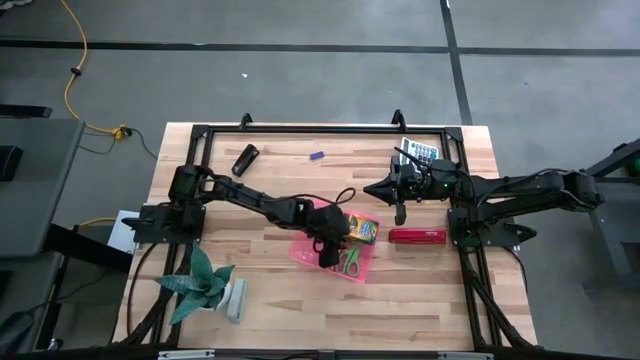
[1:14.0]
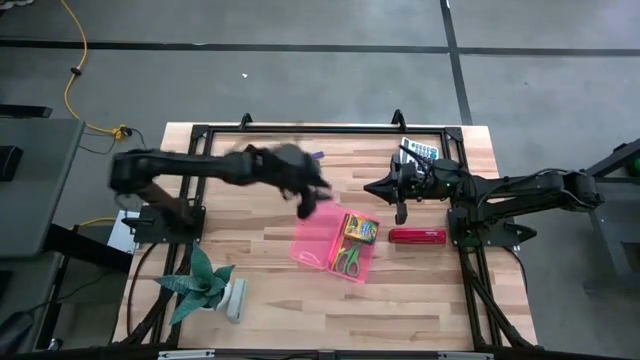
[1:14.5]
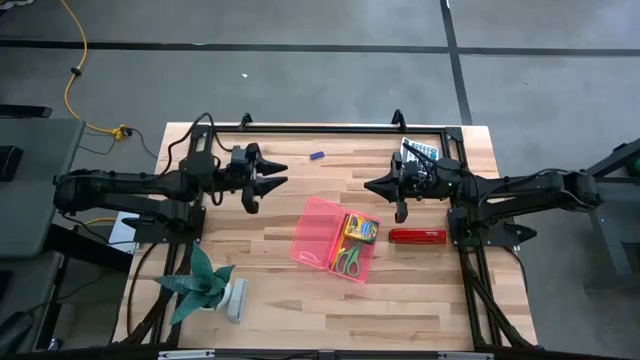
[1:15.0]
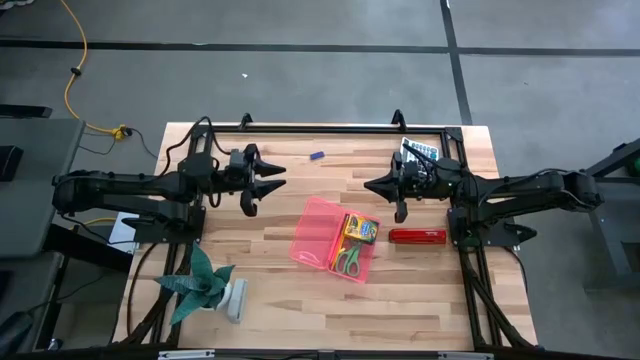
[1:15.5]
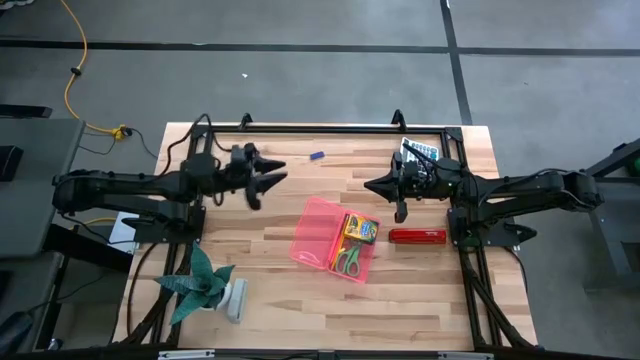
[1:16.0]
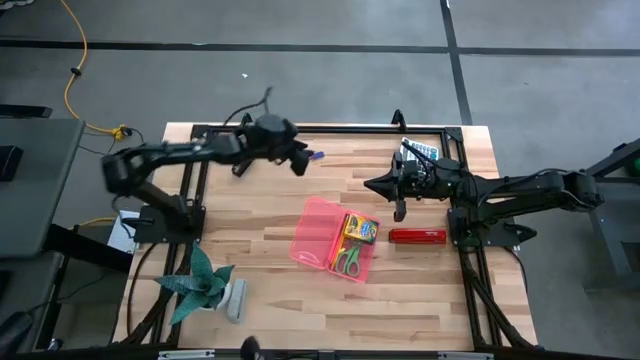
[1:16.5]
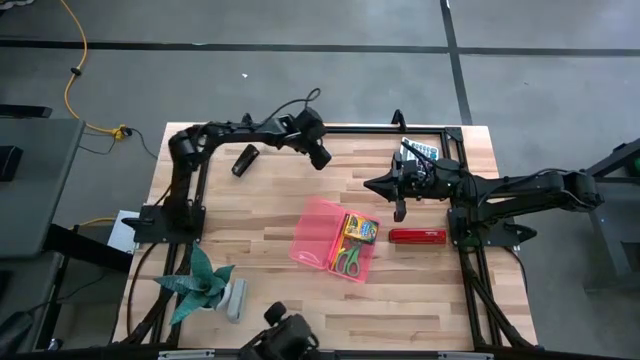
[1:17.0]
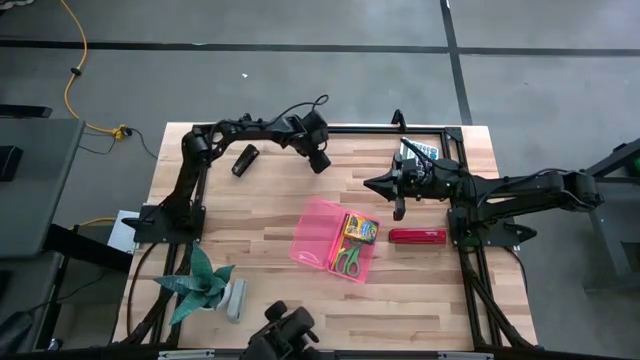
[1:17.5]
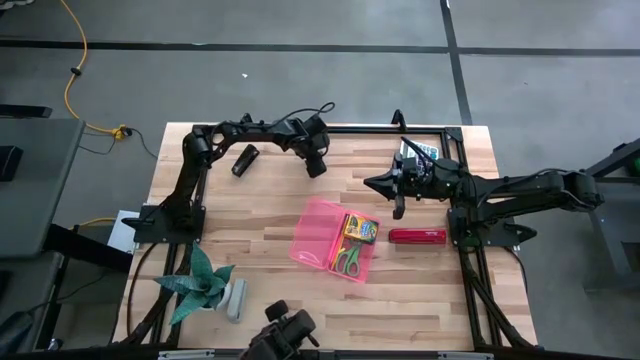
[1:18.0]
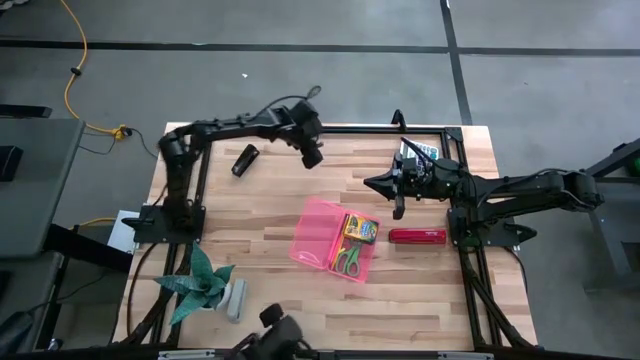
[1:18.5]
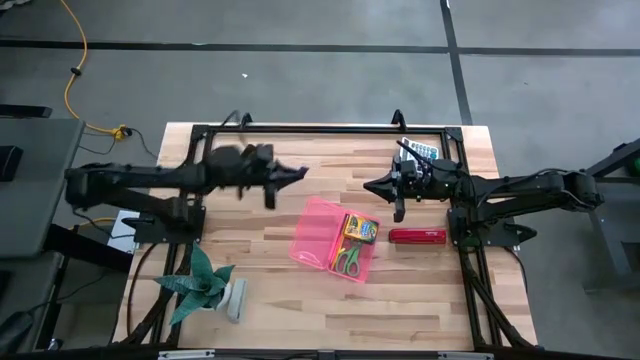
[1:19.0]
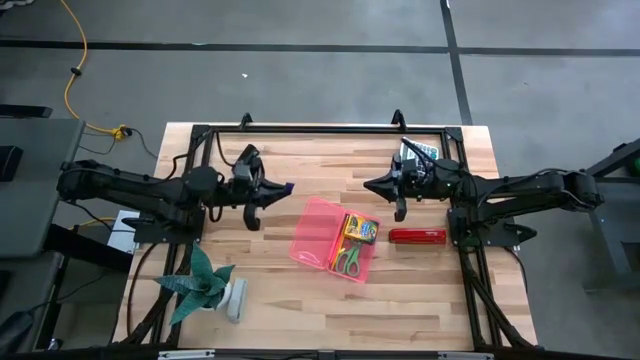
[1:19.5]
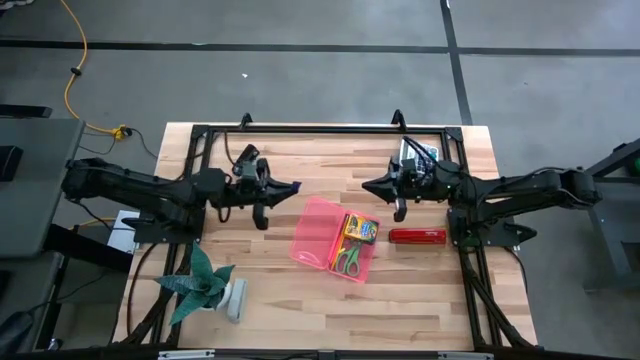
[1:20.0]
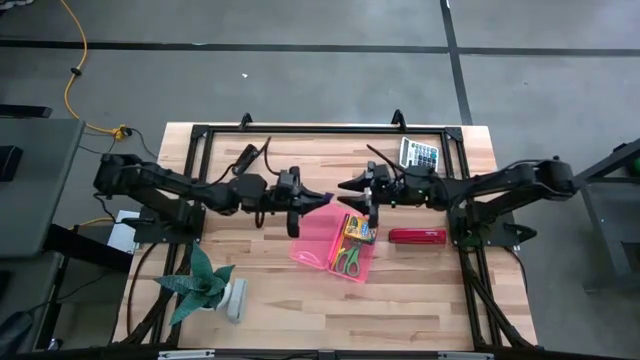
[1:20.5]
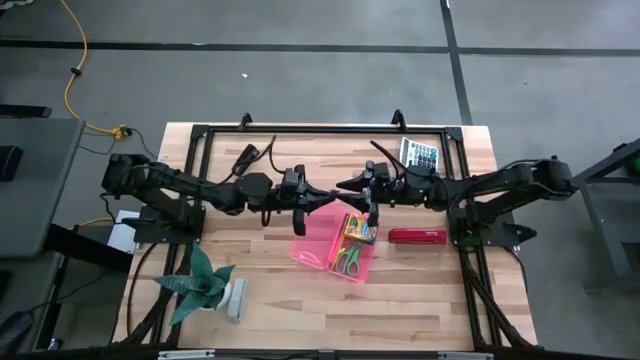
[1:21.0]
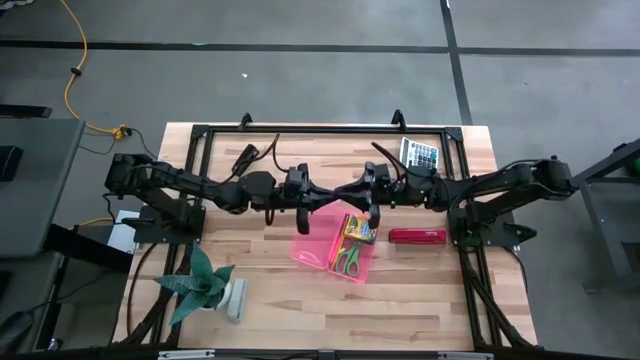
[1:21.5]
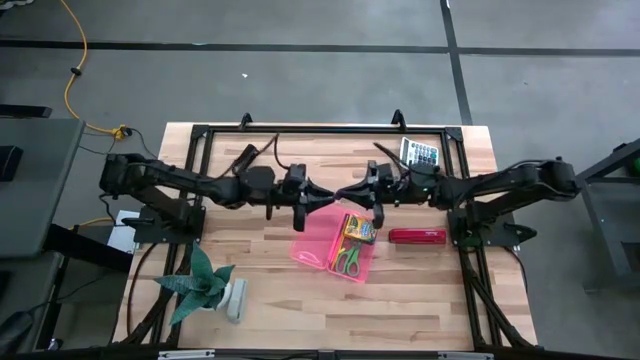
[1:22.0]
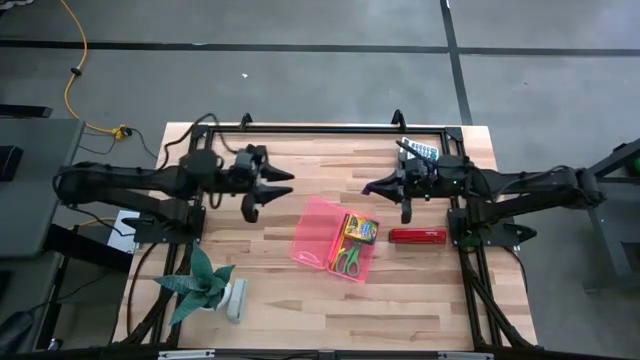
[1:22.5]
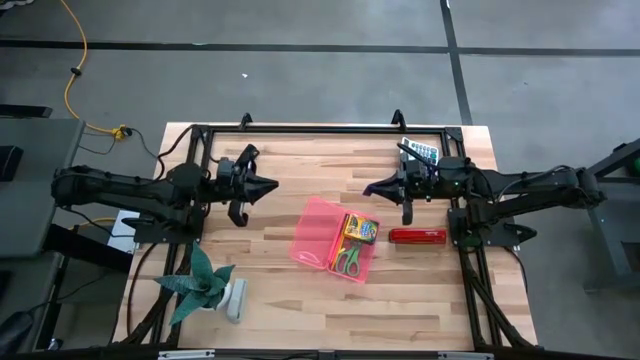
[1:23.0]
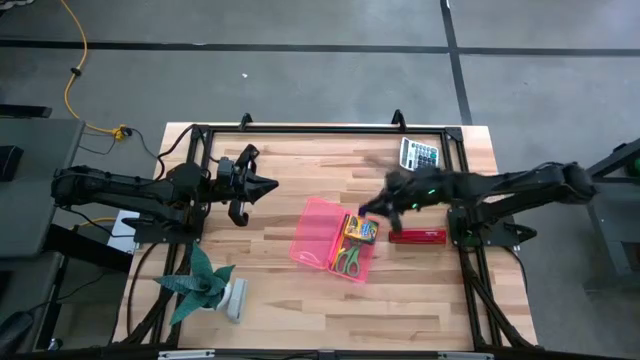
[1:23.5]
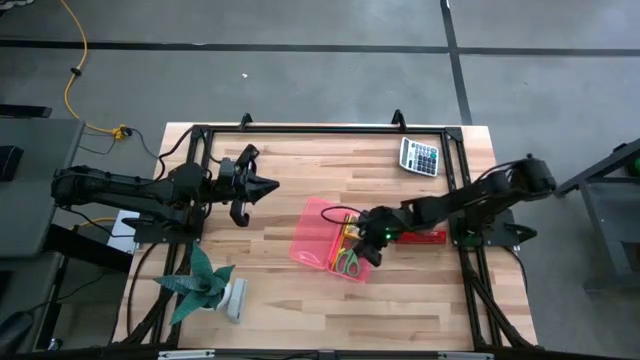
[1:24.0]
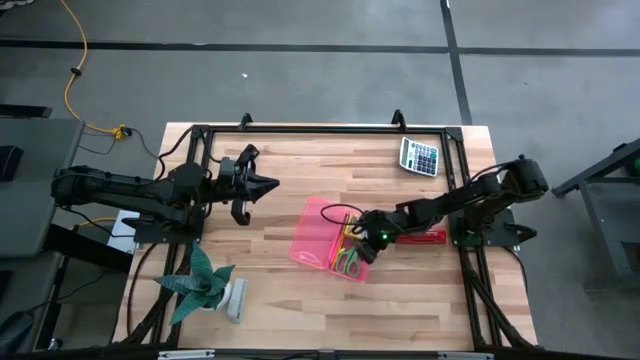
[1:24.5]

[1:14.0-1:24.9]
Task: Pack school essentials
Put the blue eraser into the pink supply box

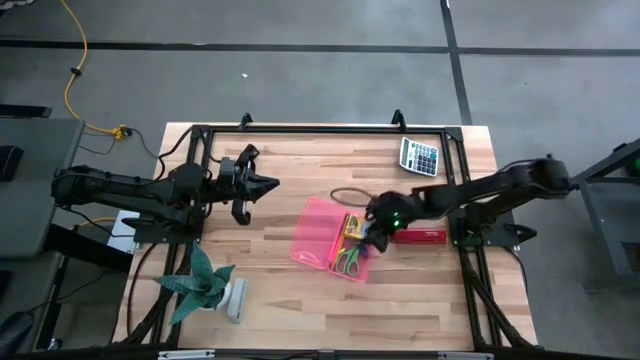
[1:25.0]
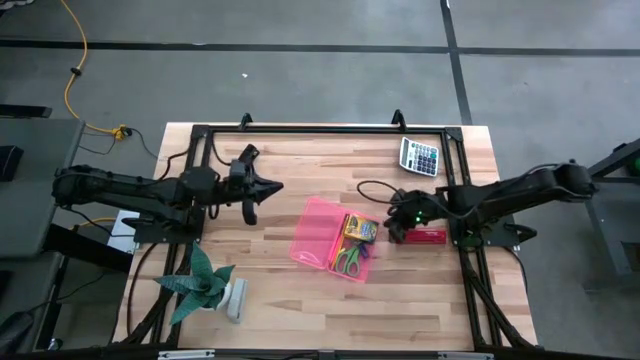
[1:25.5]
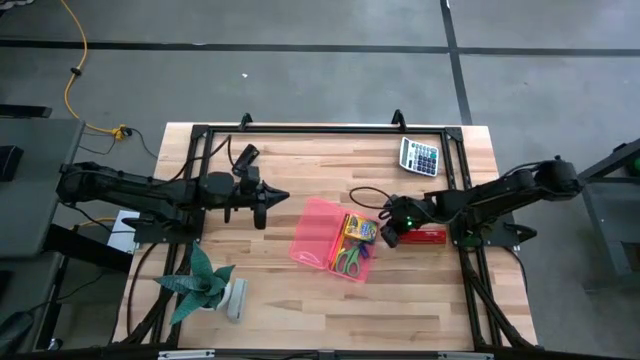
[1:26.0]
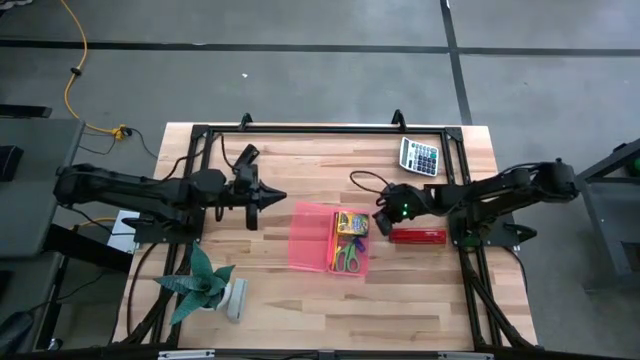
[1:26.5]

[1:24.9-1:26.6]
Adjust the pink supply box

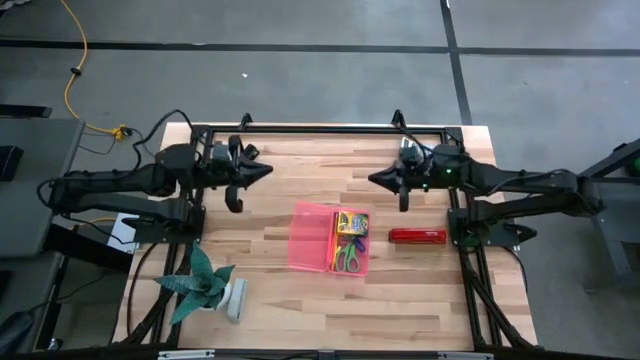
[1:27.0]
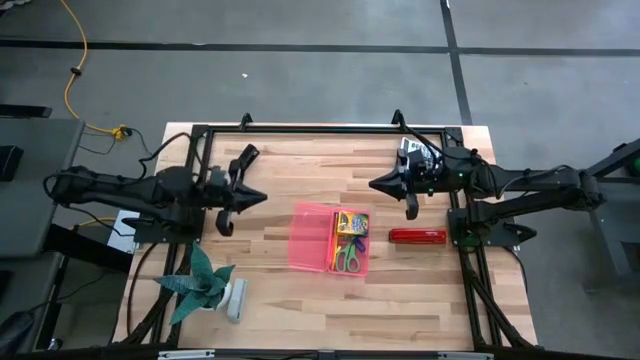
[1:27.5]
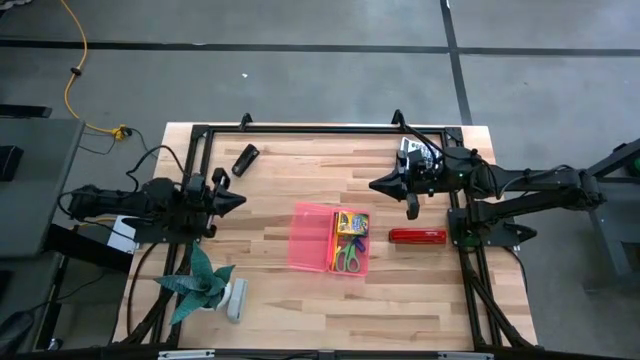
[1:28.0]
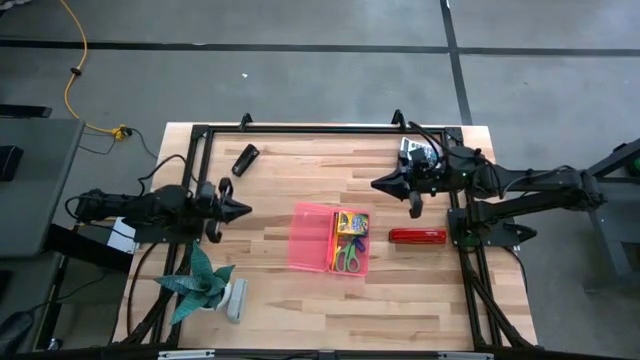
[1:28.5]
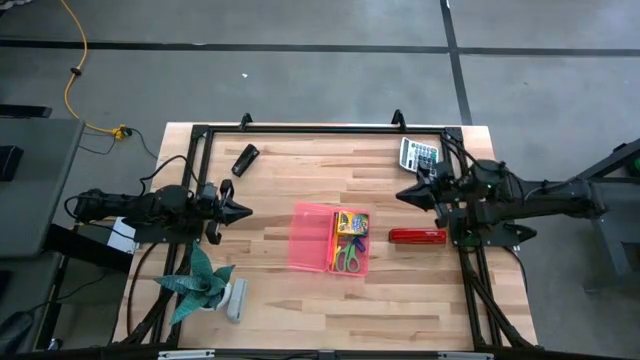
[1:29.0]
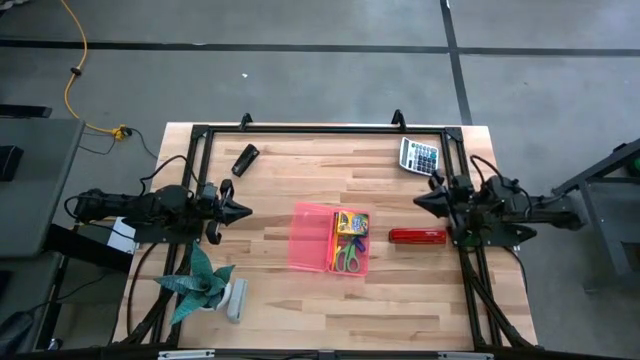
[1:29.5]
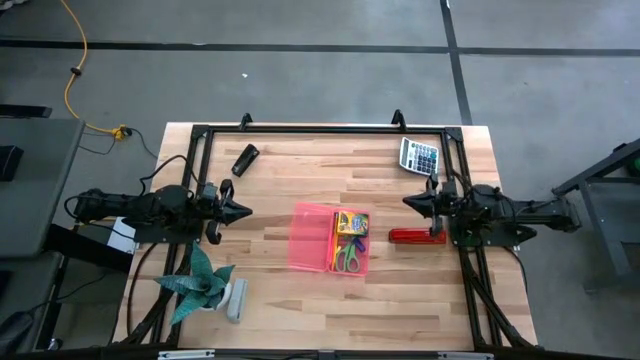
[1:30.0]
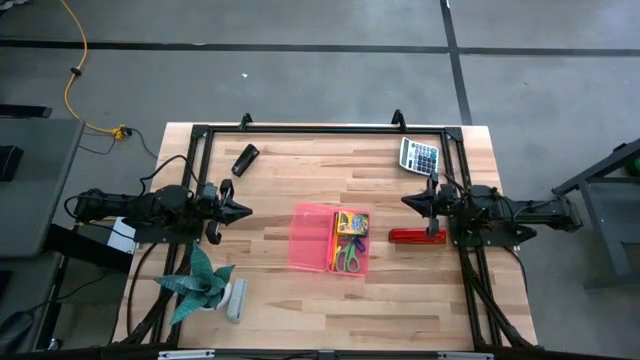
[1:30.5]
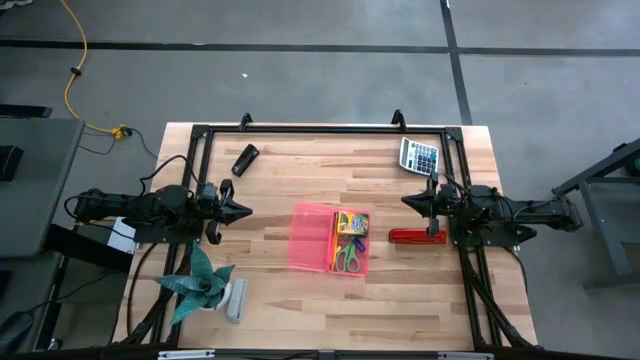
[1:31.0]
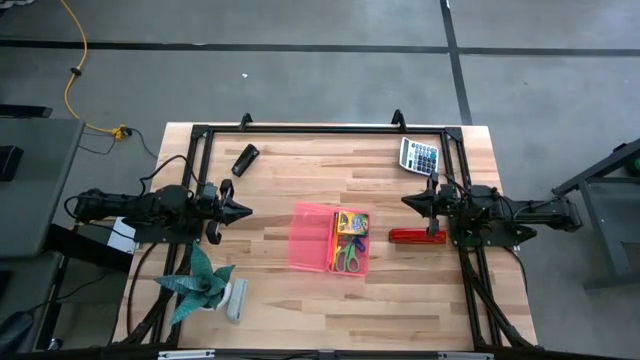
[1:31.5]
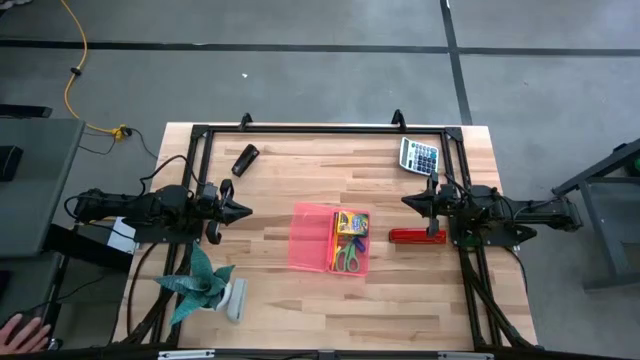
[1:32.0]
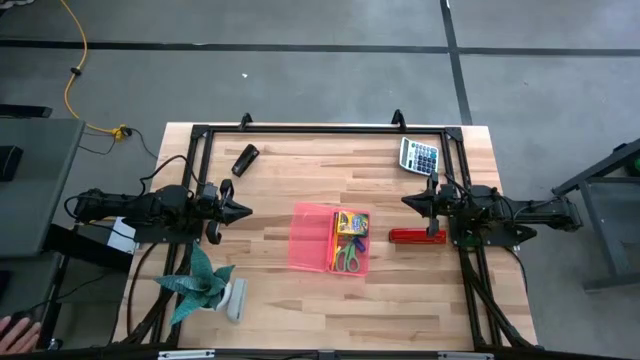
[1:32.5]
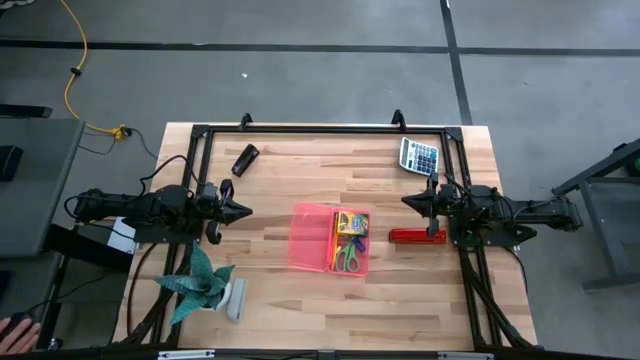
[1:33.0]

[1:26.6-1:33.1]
Return to Home Position

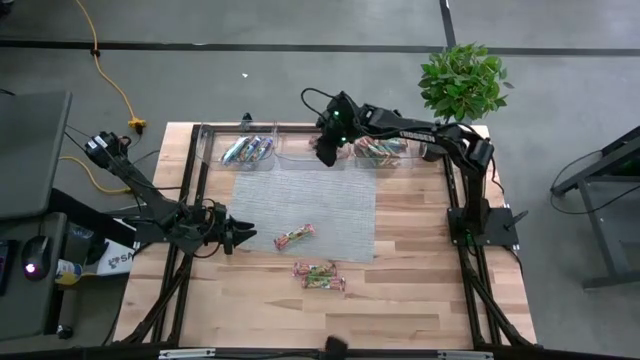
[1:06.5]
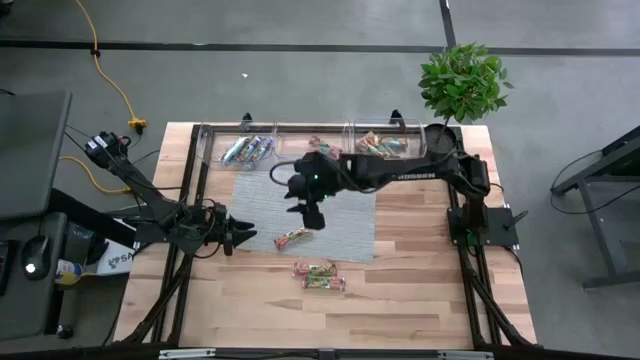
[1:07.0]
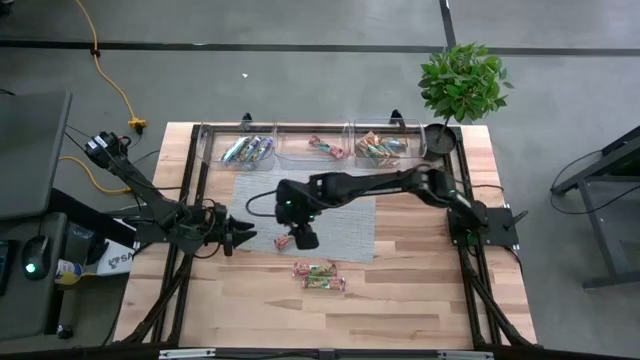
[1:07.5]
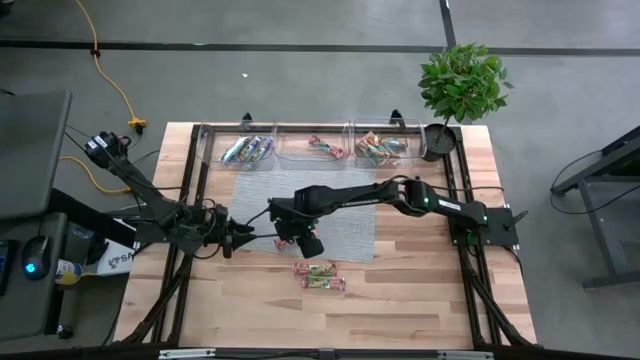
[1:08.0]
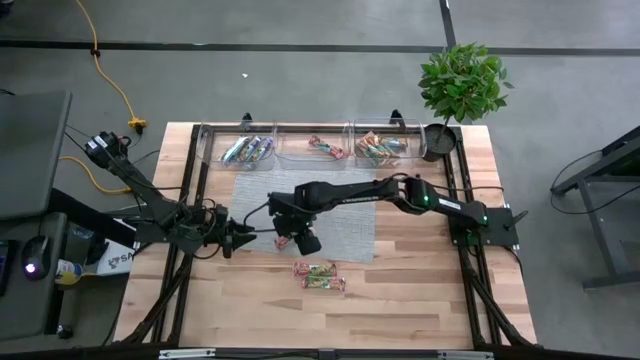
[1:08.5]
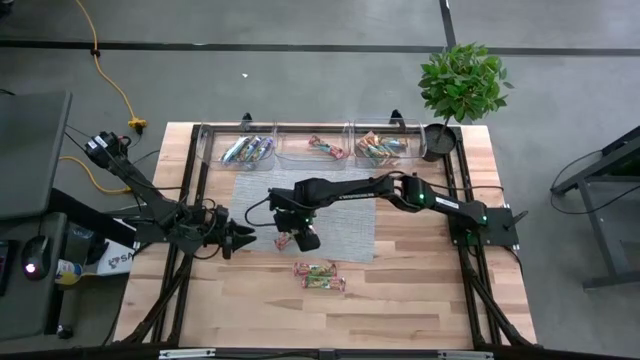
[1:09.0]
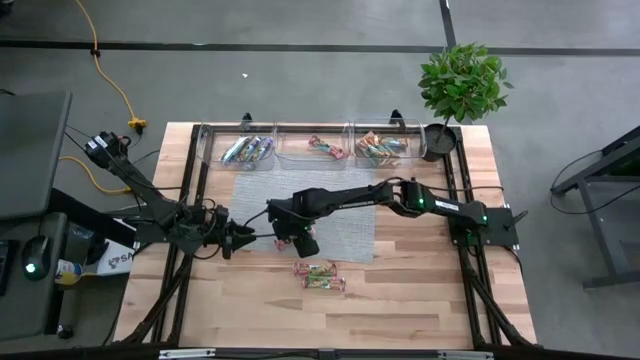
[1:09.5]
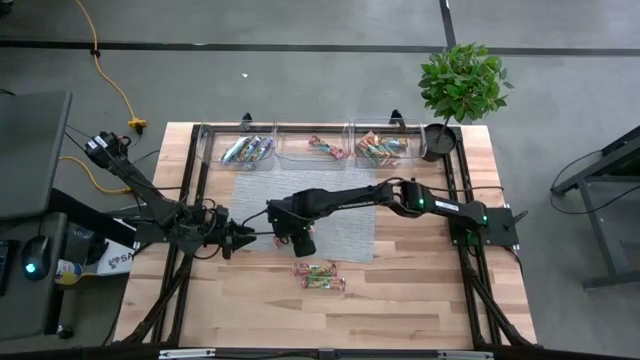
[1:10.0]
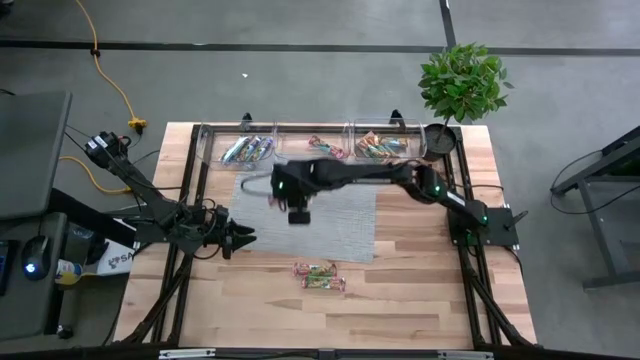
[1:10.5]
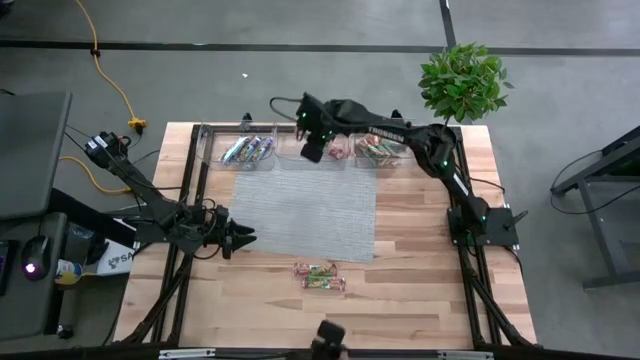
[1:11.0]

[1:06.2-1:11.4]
Task: Pick and place Granola Bars by type
Put the red granola bar into the middle transparent bin
